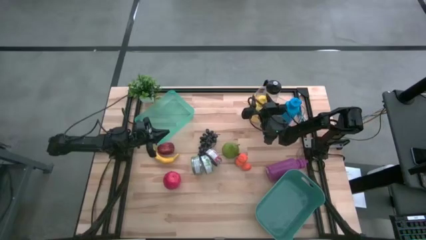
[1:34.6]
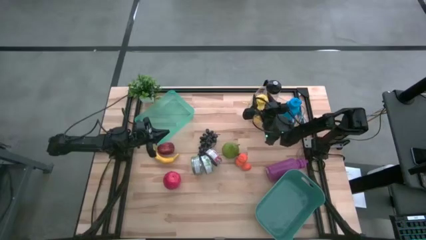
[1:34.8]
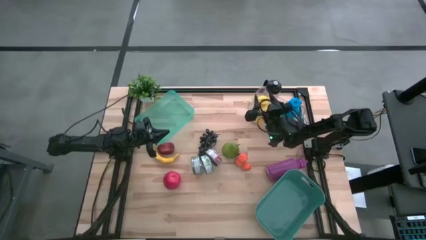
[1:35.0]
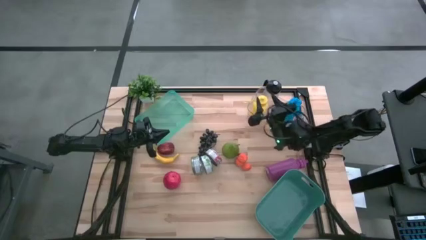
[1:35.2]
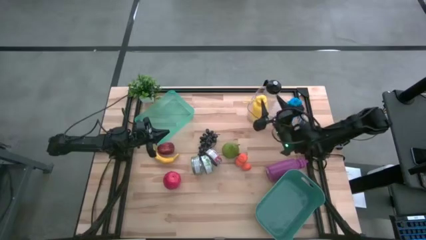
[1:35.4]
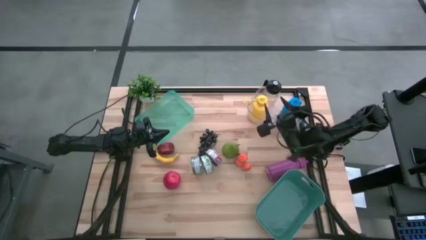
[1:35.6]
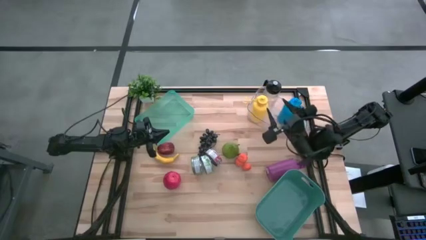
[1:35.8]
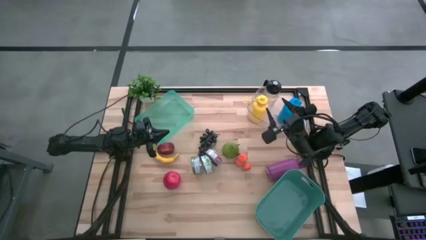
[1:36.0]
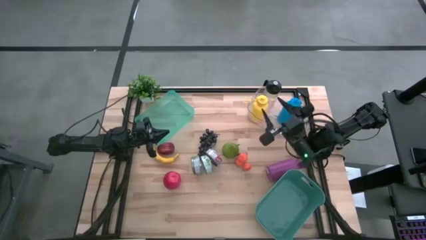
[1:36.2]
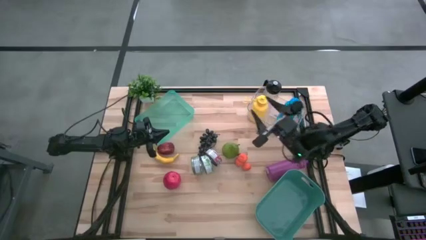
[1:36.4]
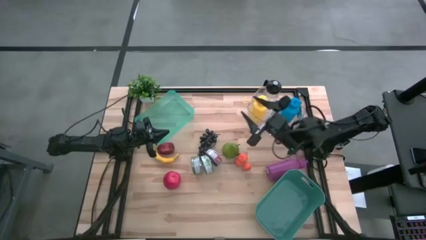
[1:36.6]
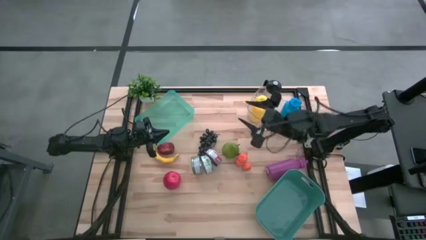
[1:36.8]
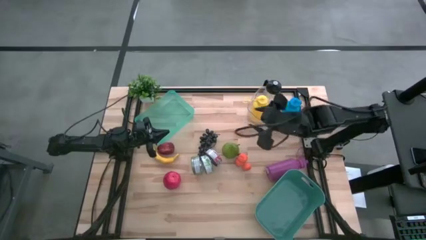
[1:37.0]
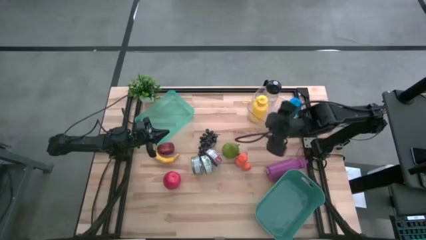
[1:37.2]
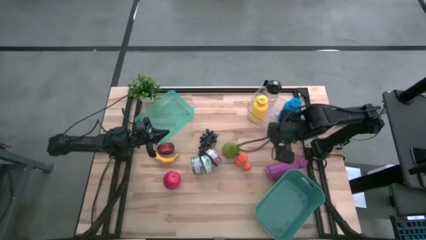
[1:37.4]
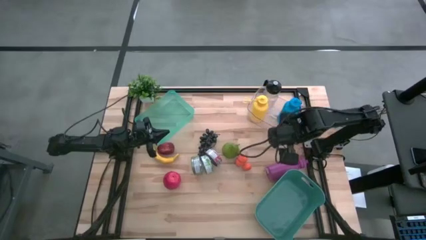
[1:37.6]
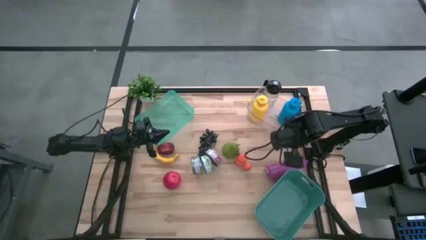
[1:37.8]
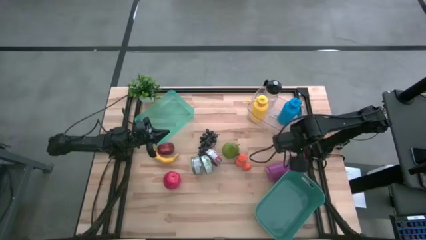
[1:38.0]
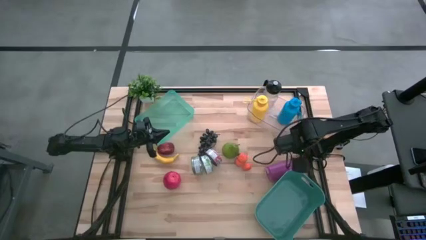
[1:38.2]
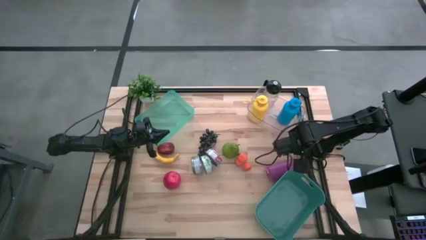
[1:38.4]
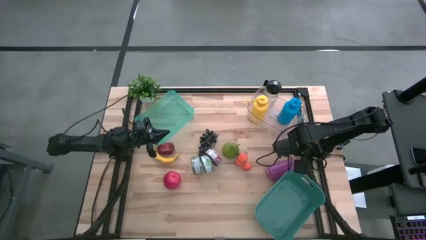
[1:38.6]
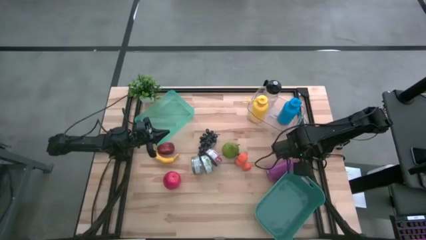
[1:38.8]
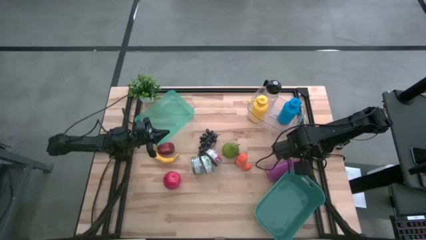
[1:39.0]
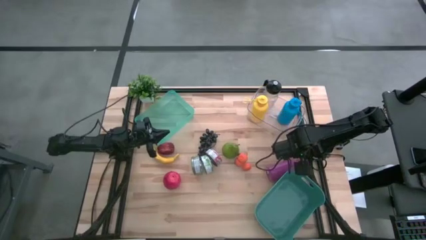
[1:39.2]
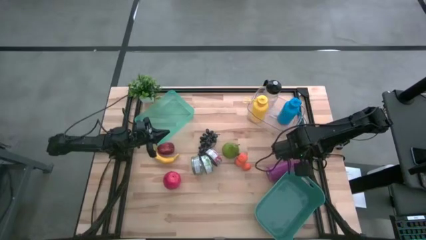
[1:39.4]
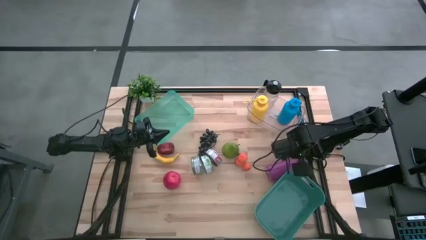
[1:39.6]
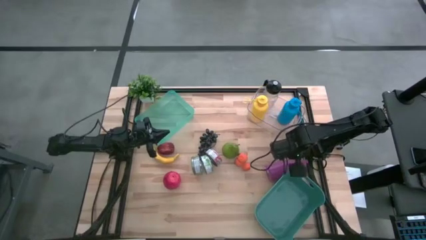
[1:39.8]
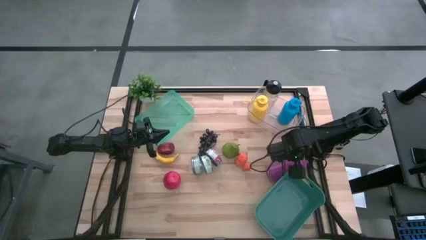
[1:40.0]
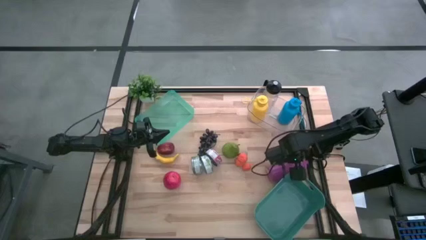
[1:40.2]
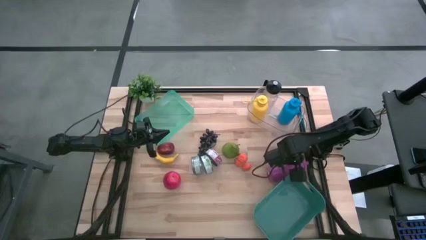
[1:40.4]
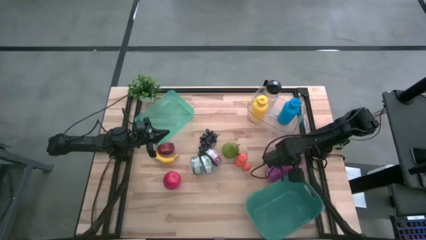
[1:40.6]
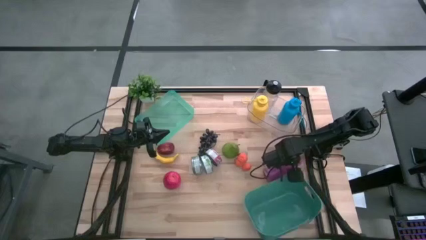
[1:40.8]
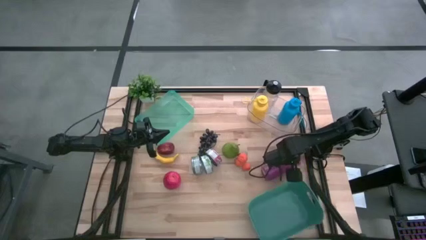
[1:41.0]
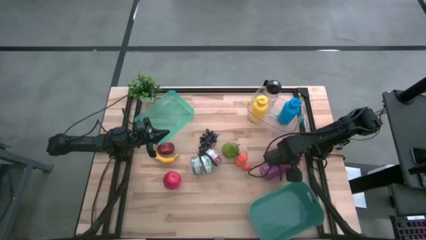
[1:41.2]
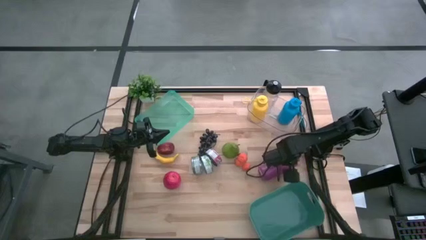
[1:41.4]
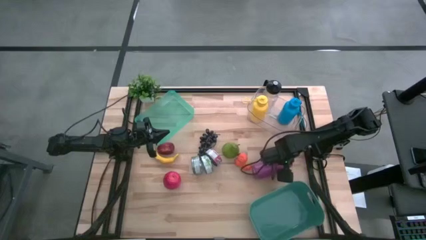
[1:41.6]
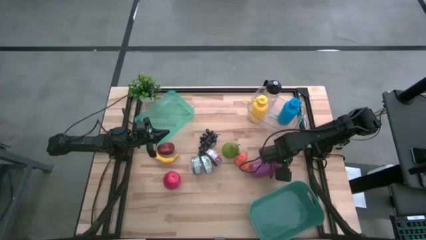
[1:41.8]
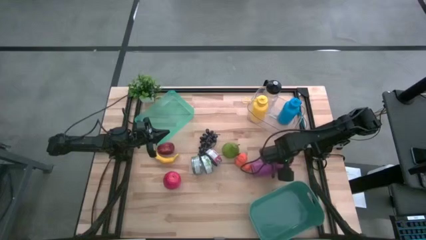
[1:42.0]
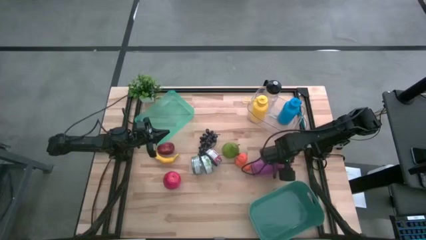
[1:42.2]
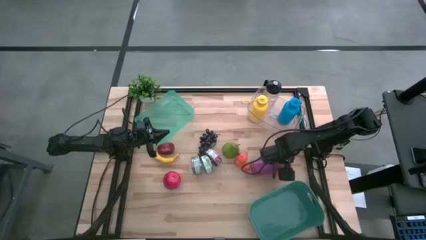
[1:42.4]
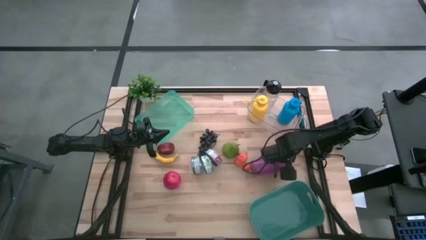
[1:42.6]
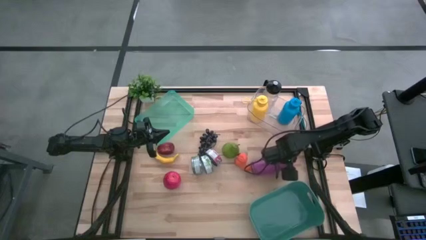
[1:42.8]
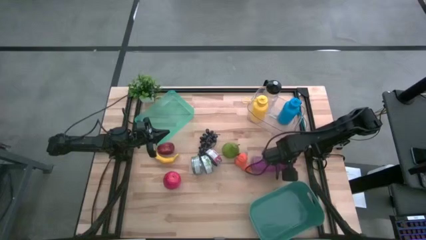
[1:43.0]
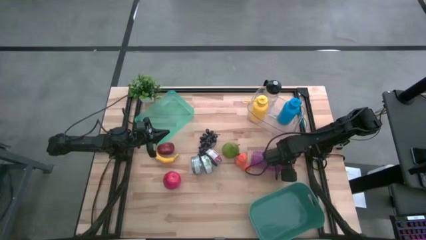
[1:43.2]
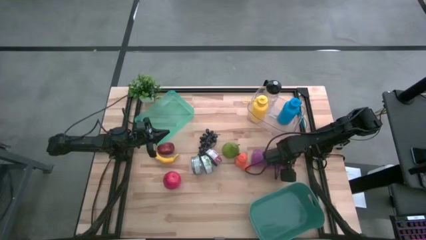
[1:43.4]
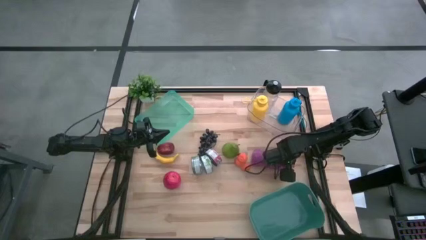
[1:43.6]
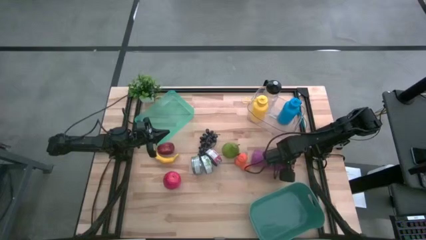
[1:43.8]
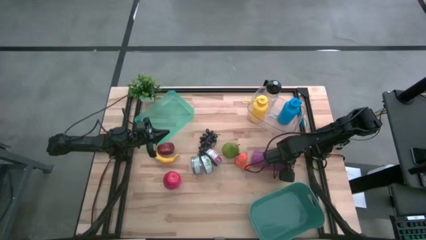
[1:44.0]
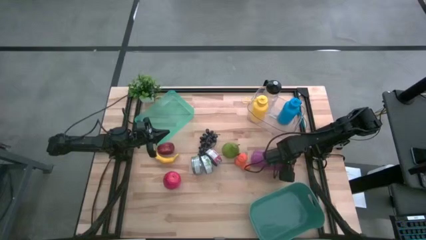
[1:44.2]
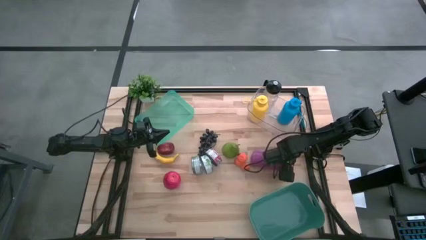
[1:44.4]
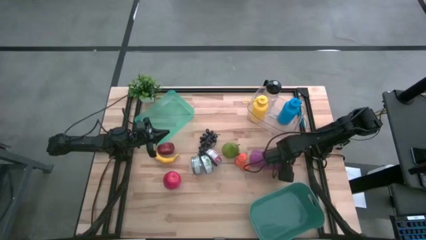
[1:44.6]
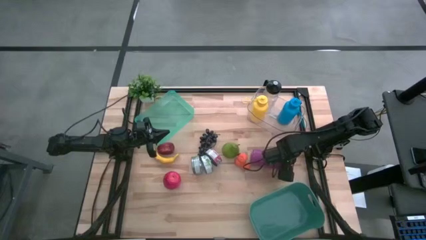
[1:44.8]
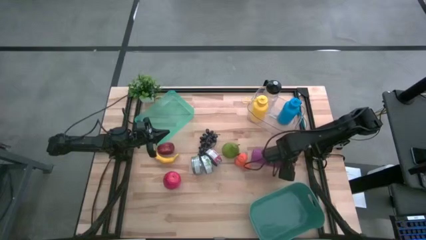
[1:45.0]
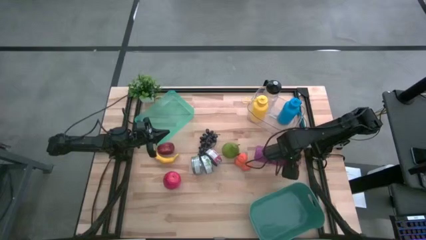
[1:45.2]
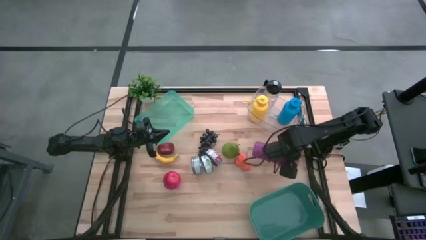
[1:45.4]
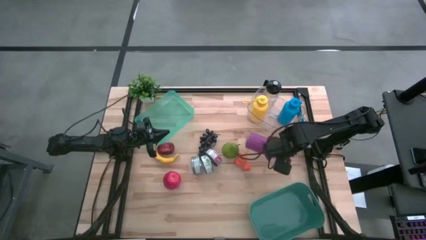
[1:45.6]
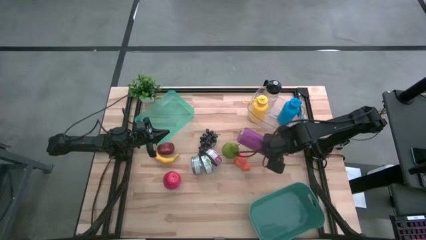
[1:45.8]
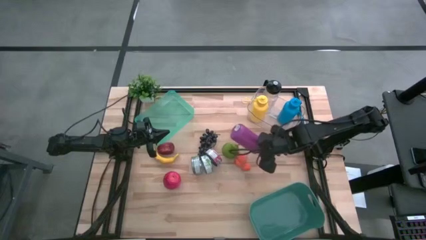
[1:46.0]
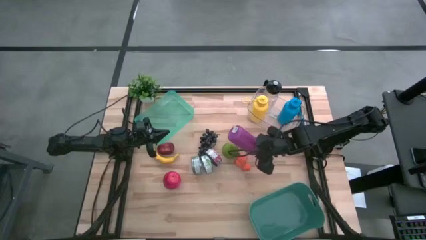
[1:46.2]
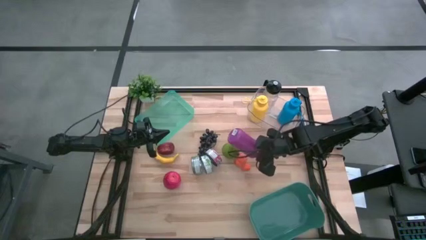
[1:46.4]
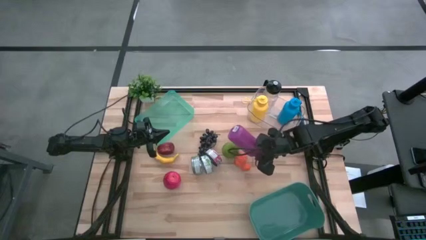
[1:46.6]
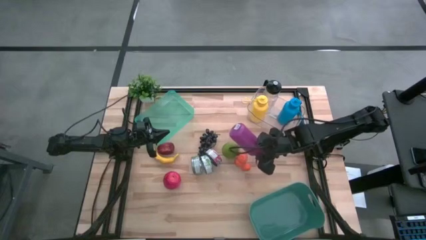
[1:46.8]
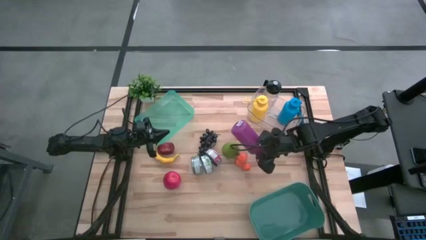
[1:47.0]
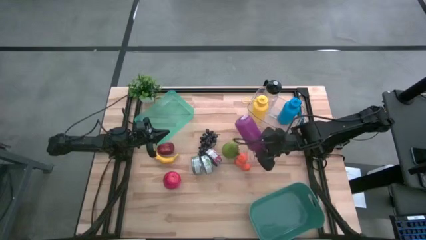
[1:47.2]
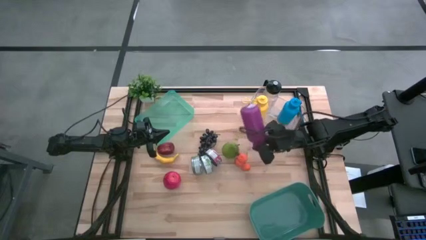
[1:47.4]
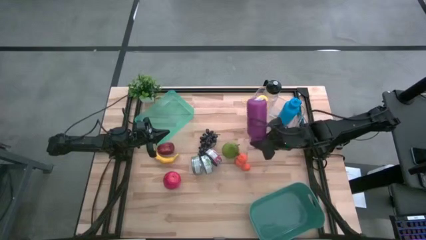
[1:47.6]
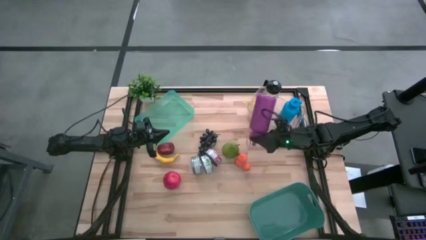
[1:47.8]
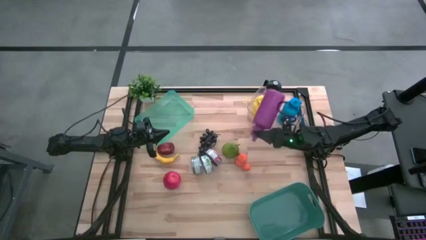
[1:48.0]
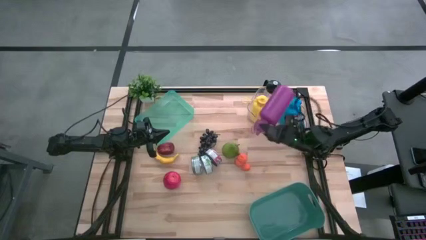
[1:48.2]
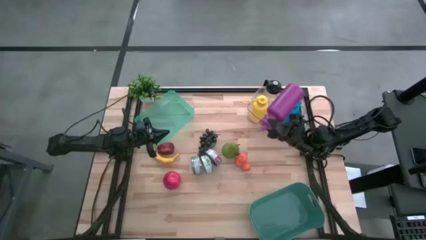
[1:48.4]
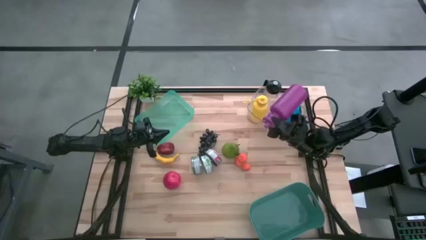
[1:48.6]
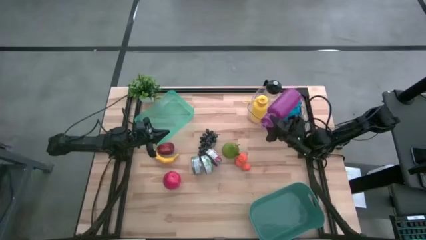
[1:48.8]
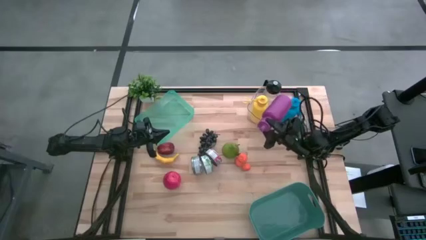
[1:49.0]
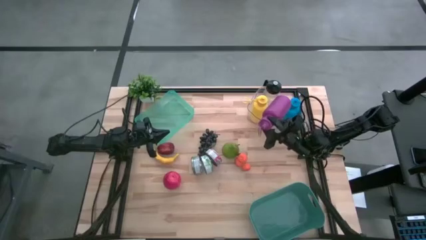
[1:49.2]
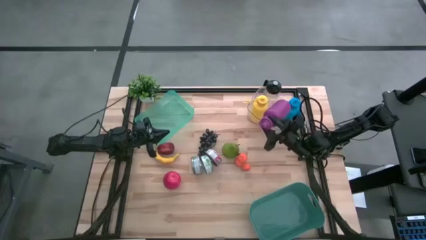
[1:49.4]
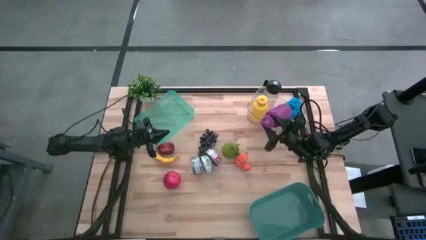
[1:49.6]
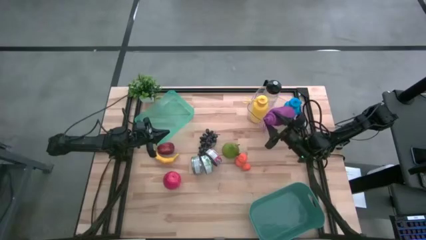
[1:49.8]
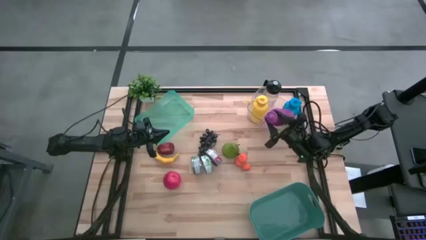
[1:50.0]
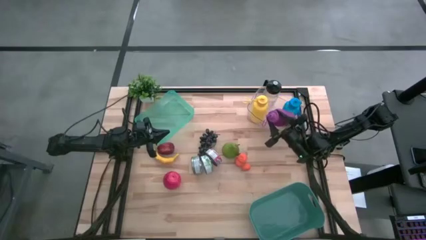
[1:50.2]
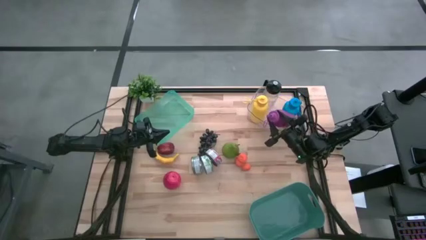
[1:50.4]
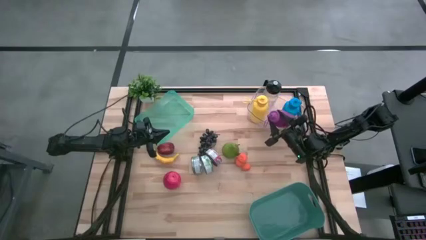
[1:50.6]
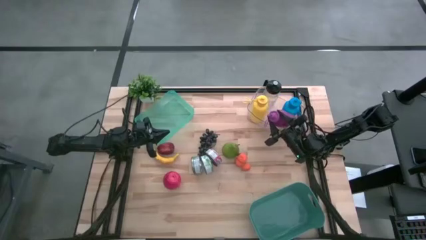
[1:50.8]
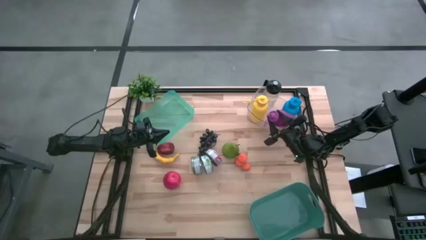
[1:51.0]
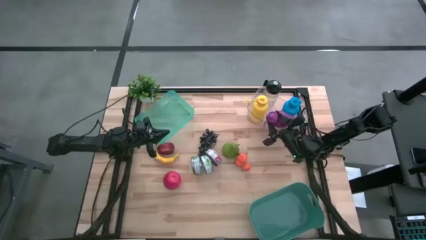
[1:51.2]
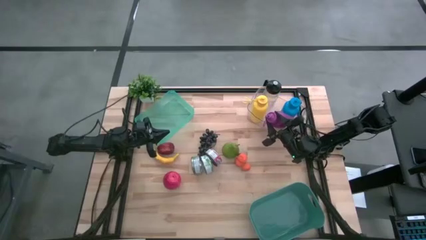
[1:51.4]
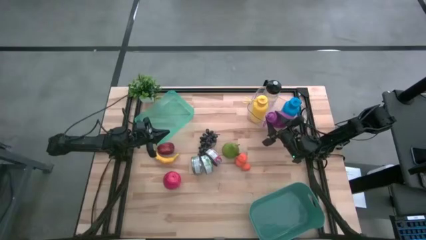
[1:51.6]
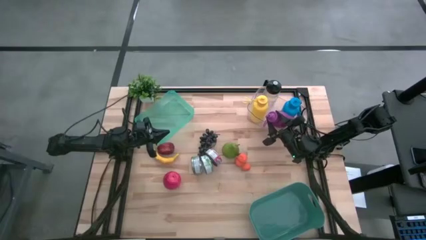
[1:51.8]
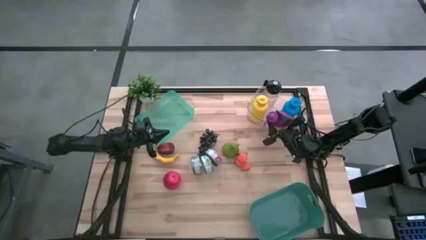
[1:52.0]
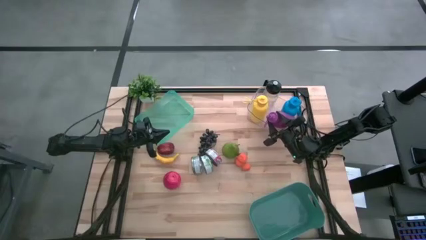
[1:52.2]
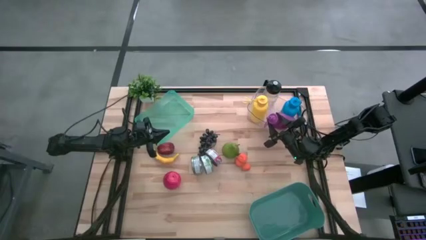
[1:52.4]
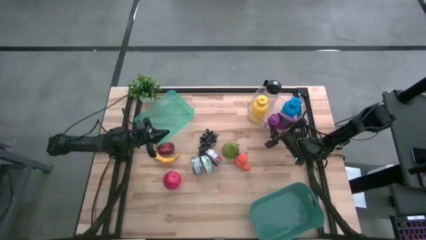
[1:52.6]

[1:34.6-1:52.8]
Task: Pick & Place Food Item
Put the pink water bottle into the transparent bin
